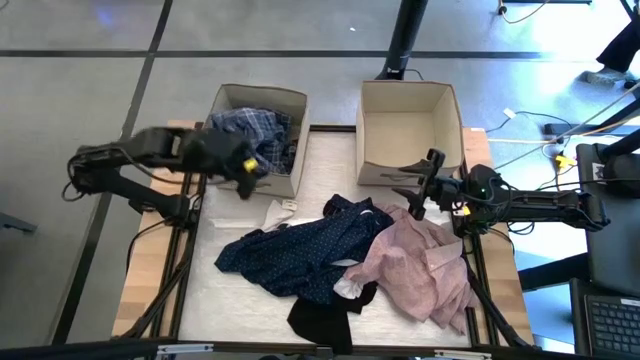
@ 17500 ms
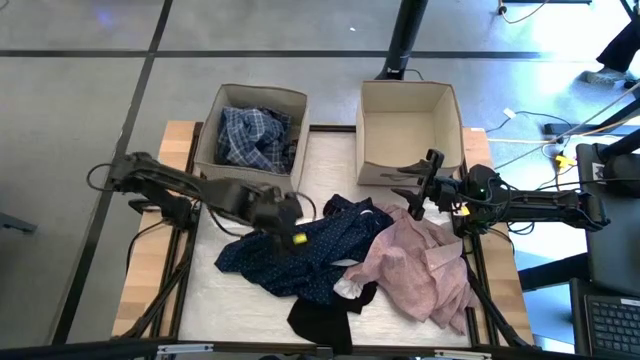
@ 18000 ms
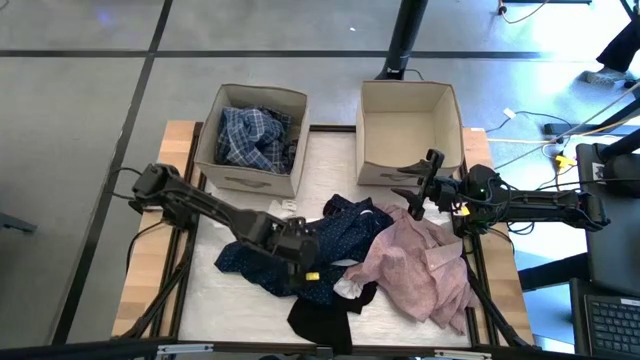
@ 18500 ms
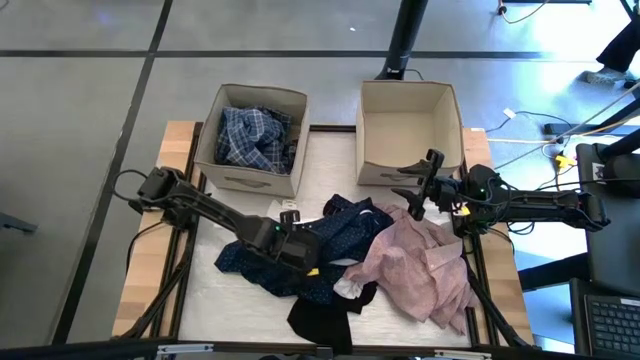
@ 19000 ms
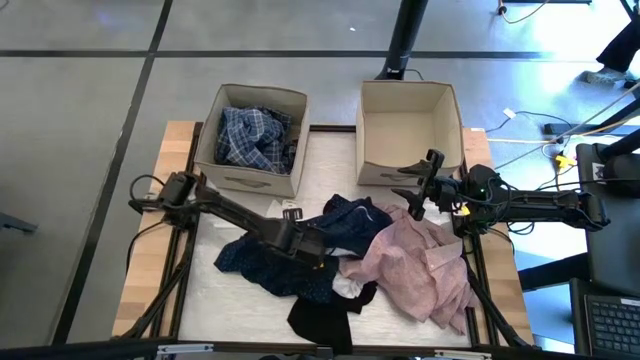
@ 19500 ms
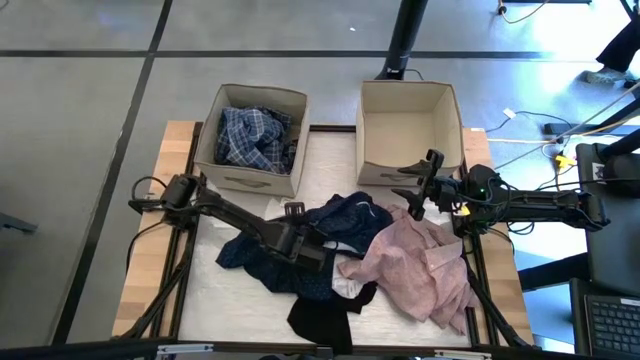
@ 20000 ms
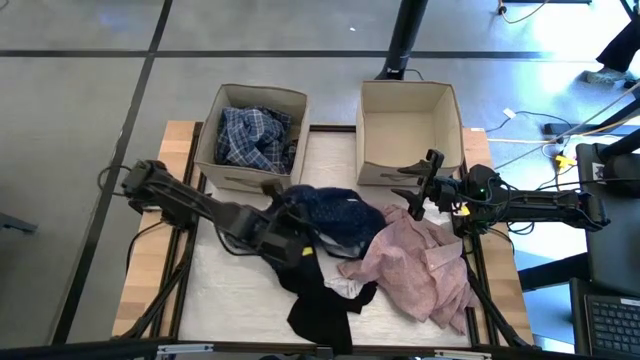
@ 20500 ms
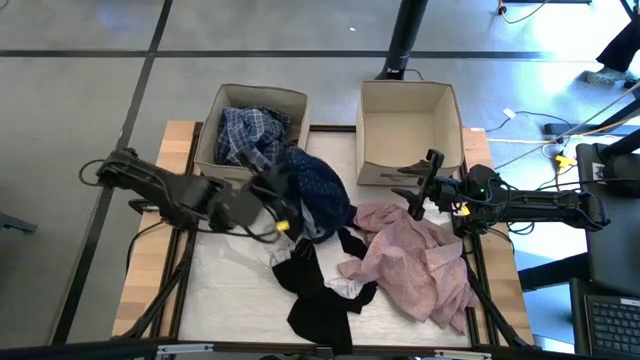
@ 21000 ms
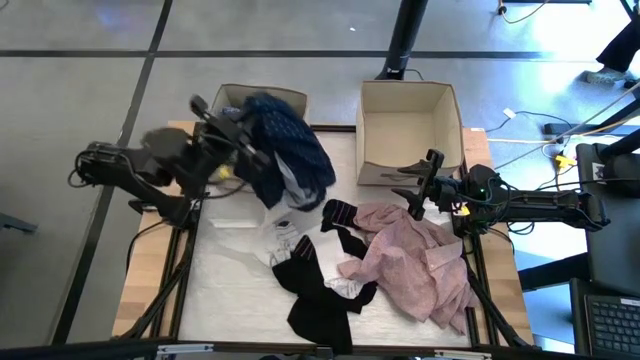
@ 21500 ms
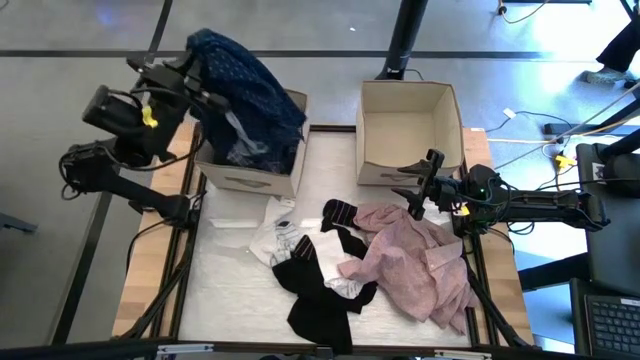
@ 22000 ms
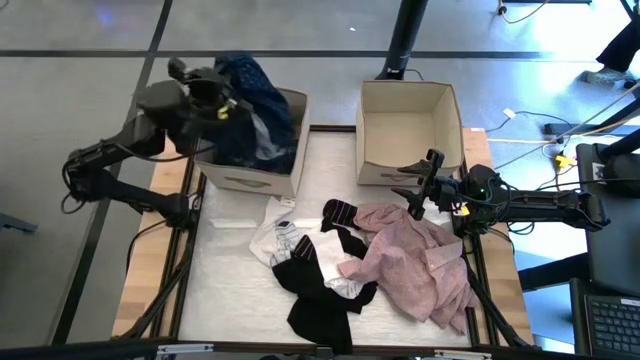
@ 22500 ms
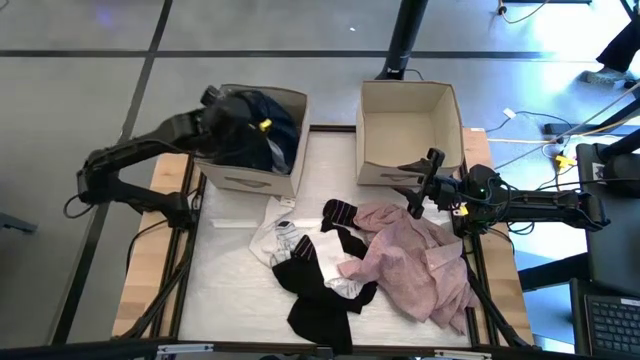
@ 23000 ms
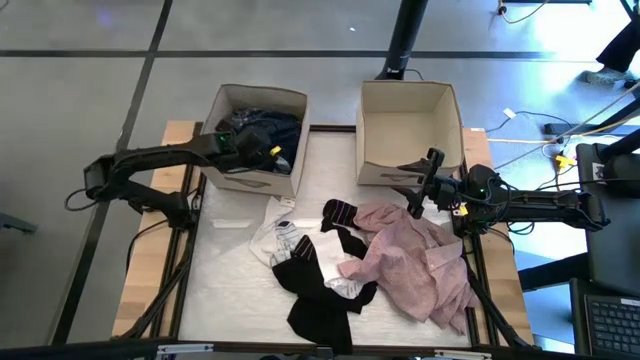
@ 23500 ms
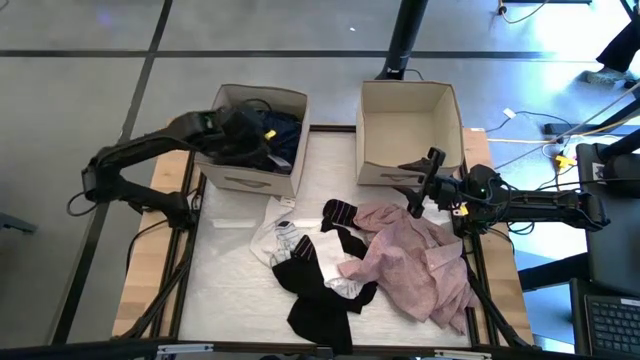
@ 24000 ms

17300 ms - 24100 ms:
Task: Sort clothes
Put the dark blue polo shirt into the left laundry organizer

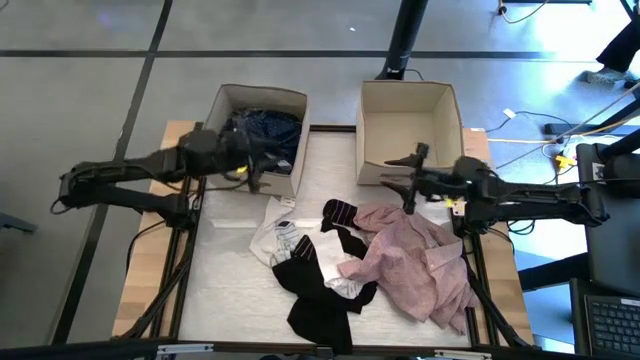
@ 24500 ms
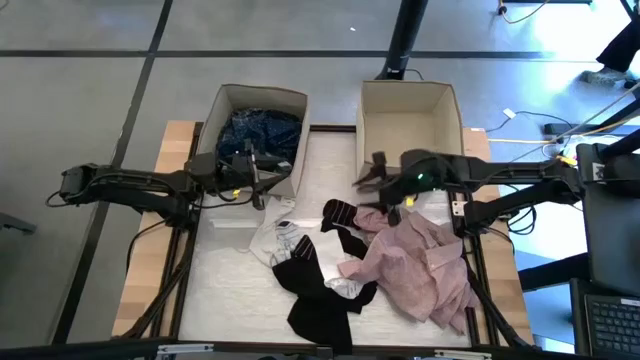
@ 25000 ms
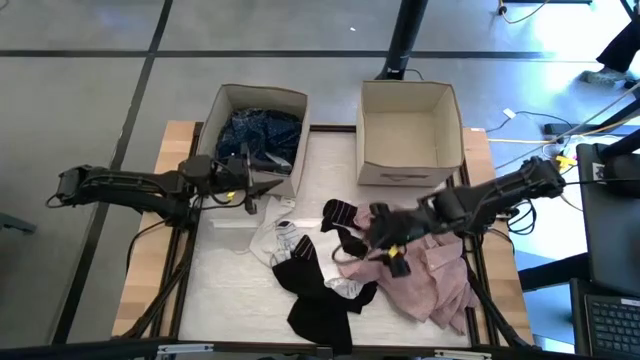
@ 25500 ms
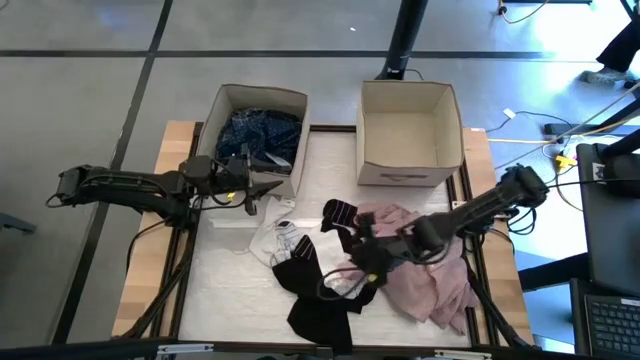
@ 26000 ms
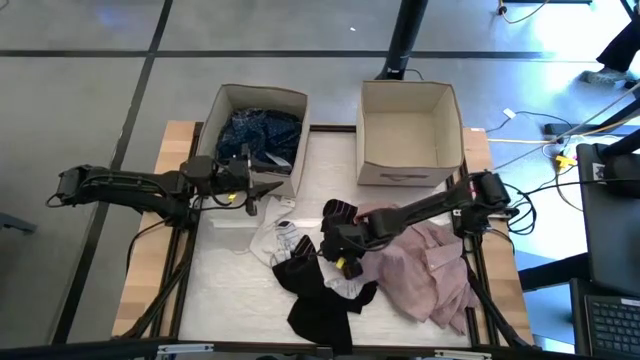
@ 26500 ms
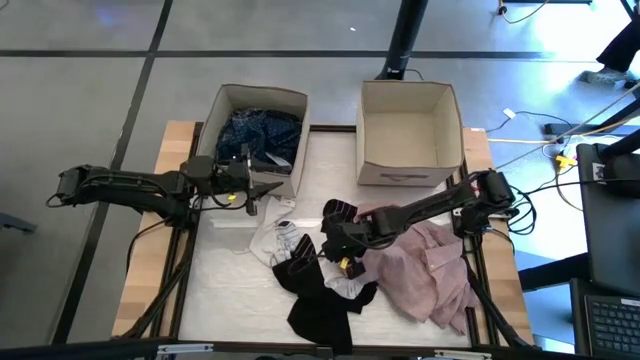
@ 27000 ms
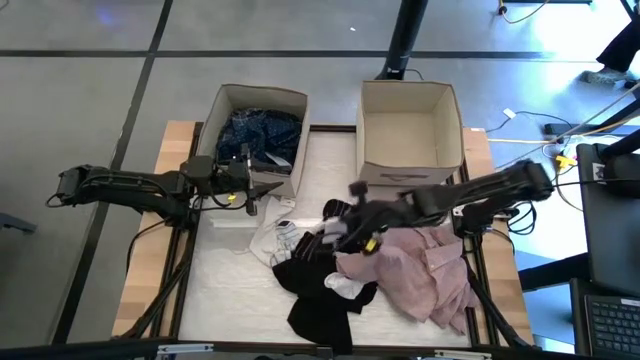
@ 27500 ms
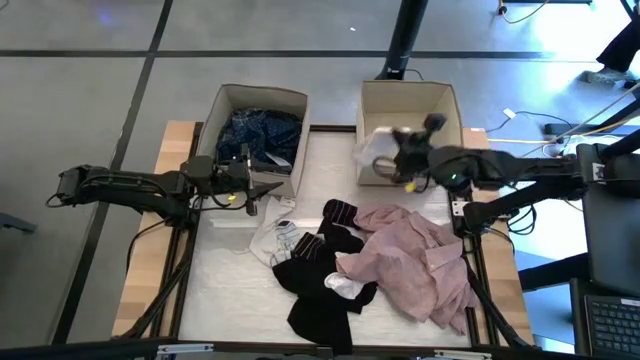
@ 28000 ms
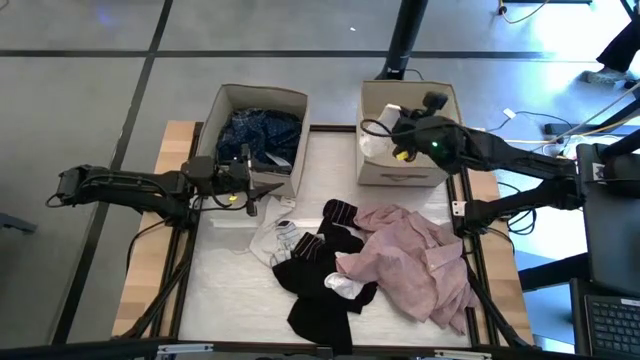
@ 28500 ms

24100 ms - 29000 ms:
Put the white sock into the right laundry organizer

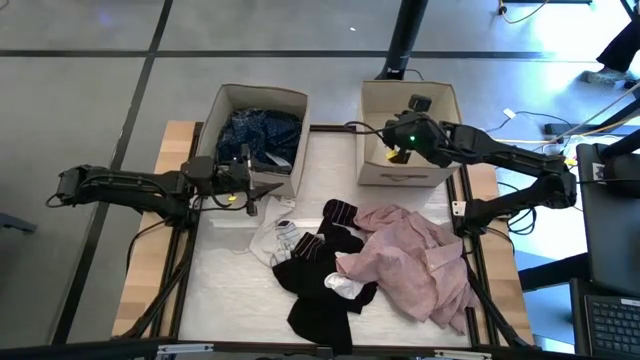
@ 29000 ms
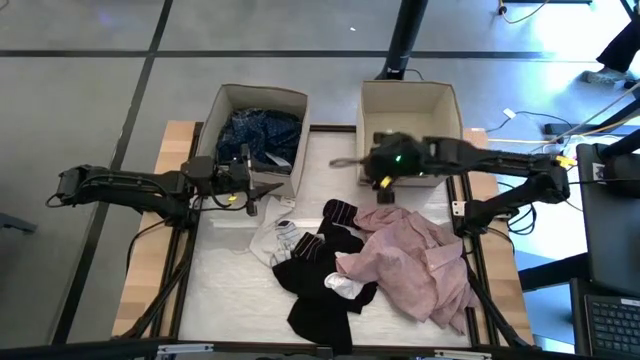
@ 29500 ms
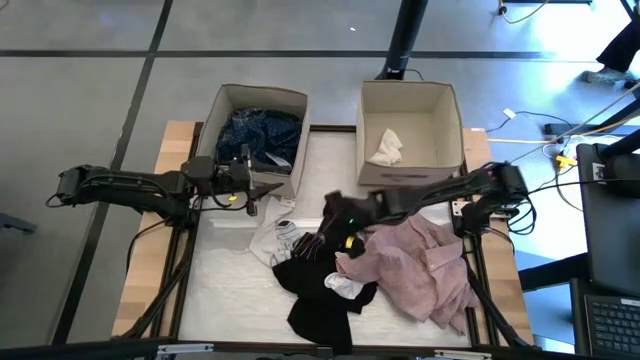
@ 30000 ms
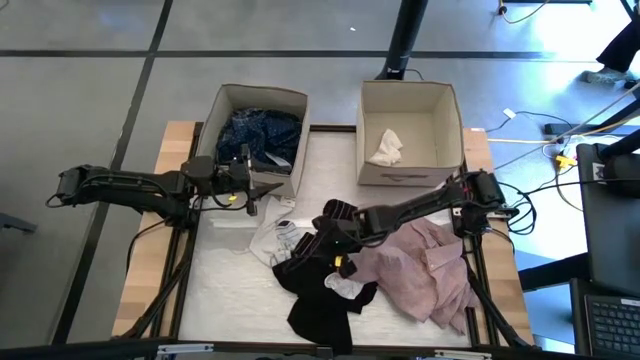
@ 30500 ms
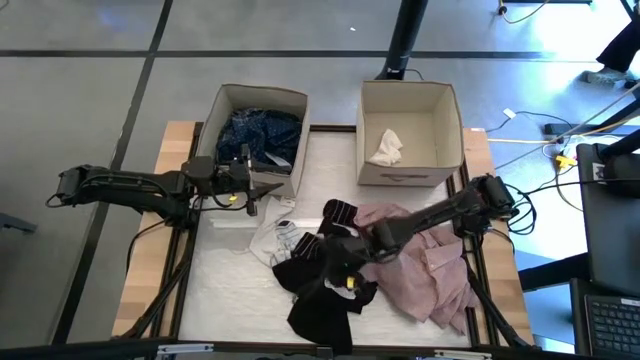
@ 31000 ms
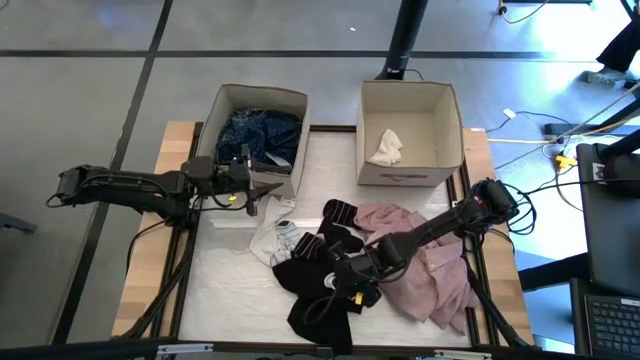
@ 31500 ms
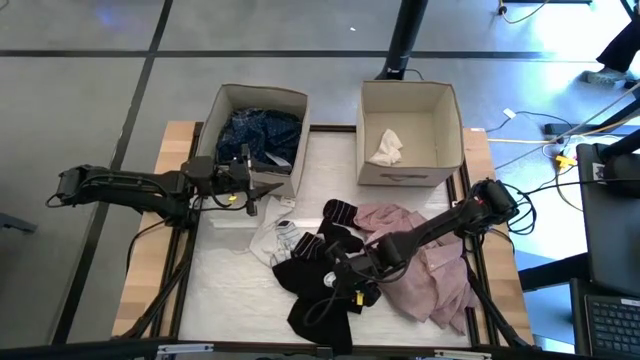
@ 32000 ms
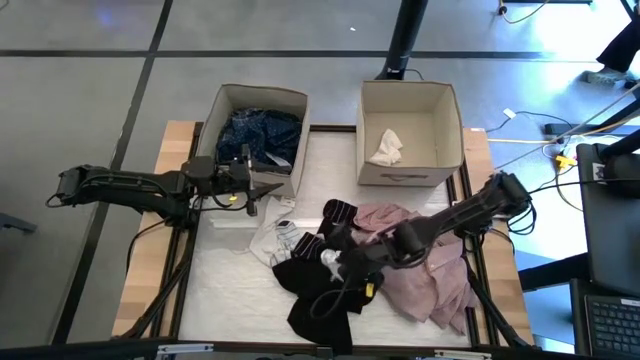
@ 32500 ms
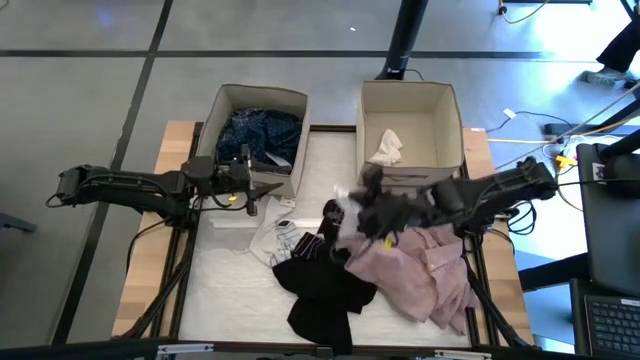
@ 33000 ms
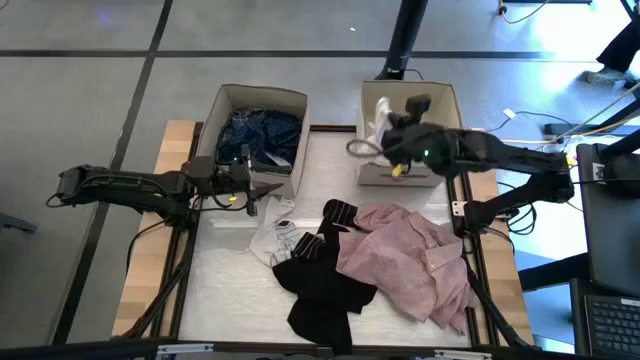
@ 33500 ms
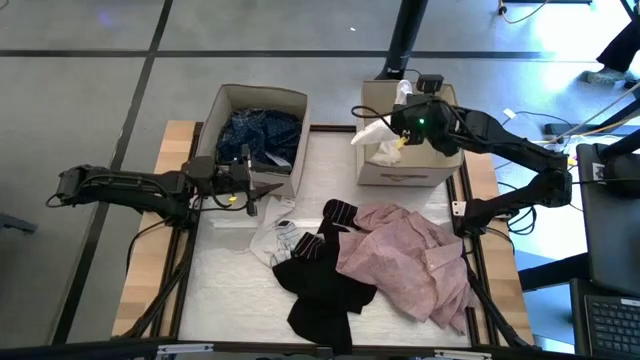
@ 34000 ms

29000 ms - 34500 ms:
Put the white sock into the right laundry organizer

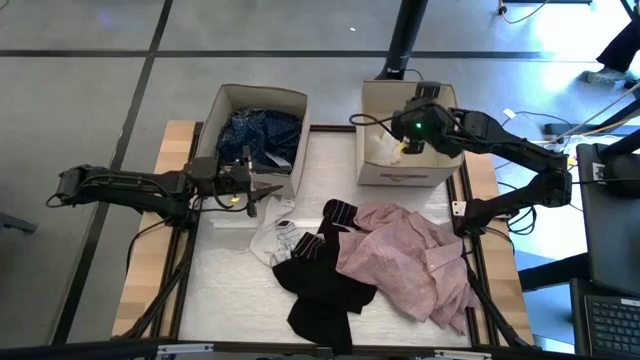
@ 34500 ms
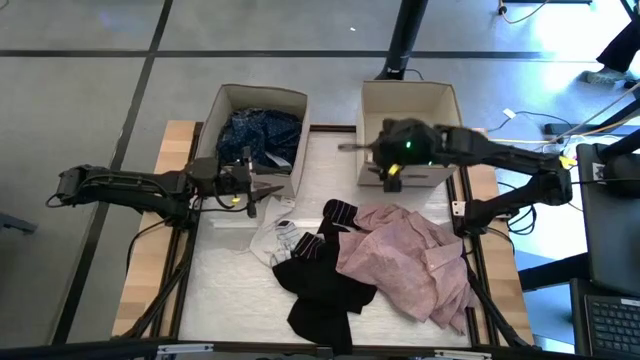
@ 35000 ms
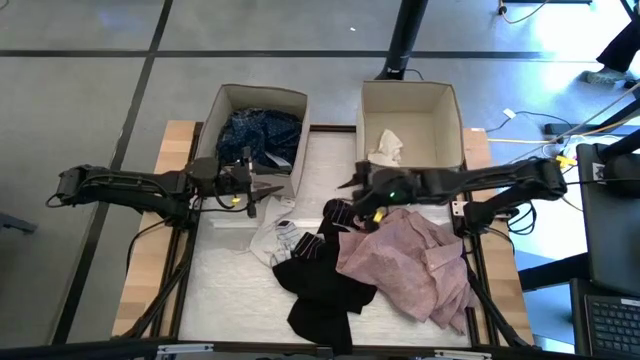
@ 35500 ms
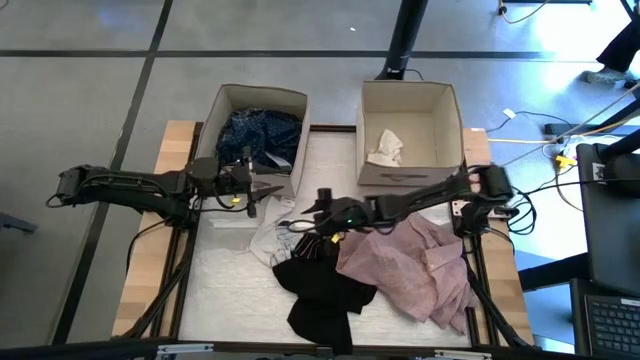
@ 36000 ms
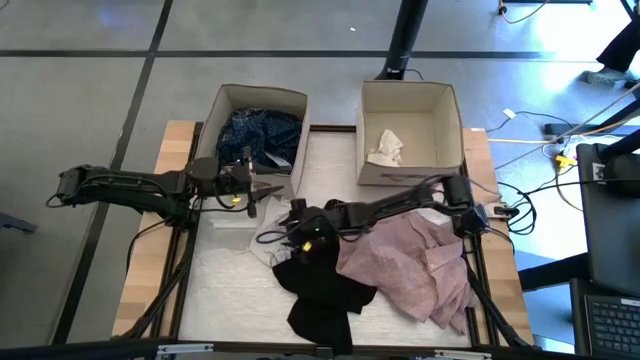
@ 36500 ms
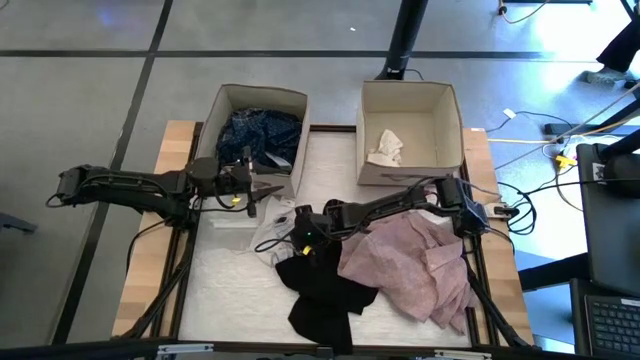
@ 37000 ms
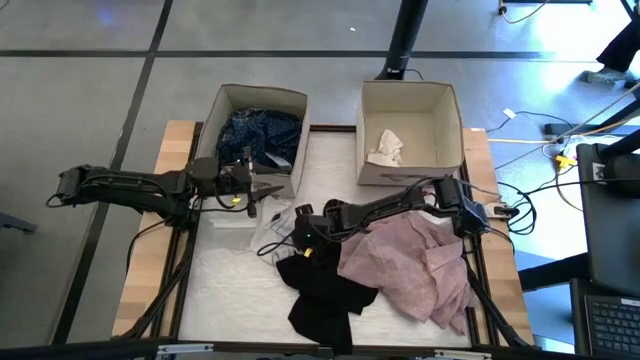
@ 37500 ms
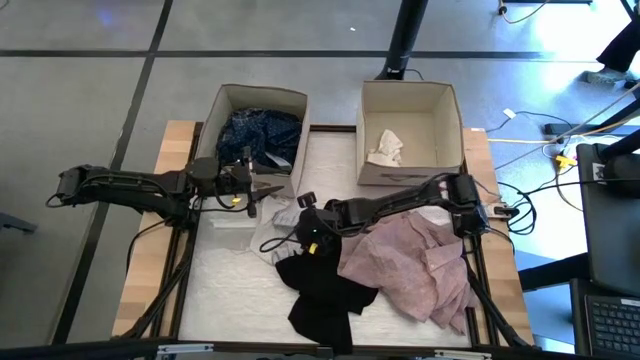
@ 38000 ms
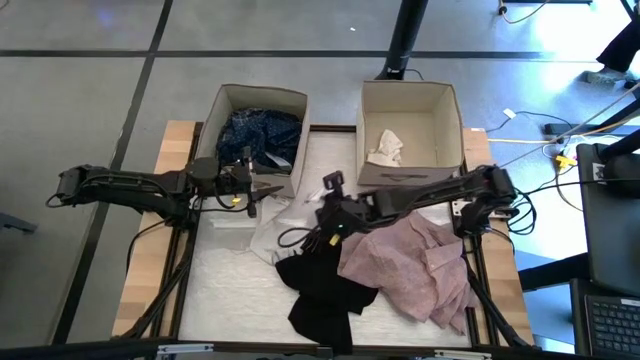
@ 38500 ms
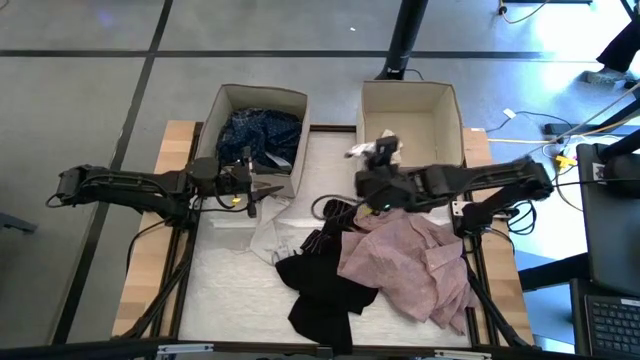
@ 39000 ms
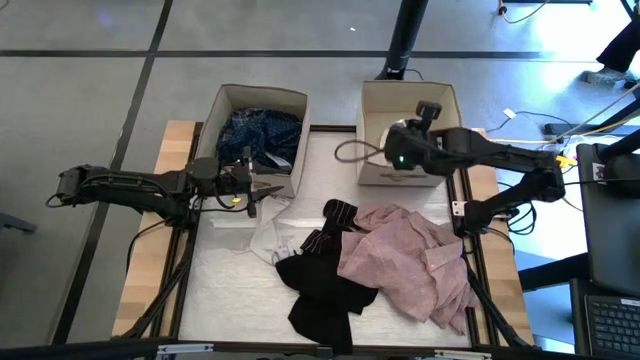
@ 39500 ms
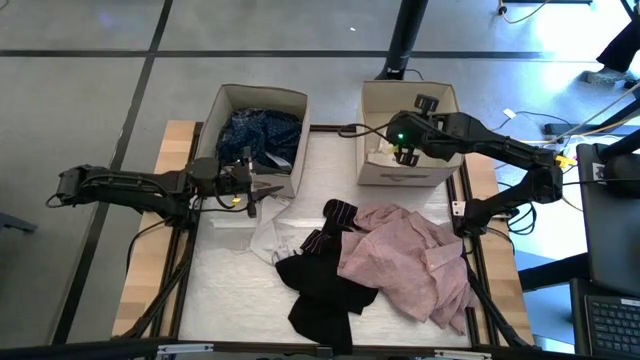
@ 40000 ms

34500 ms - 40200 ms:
Put the white patterned sock into the right laundry organizer
